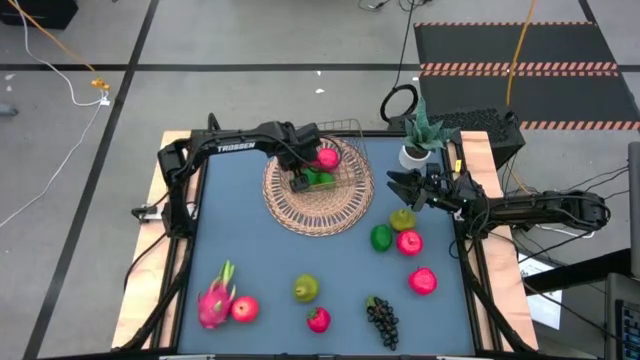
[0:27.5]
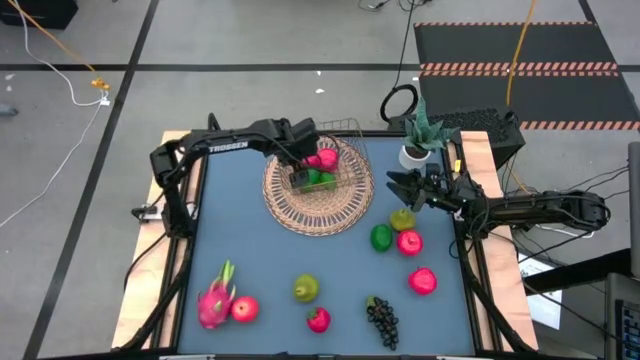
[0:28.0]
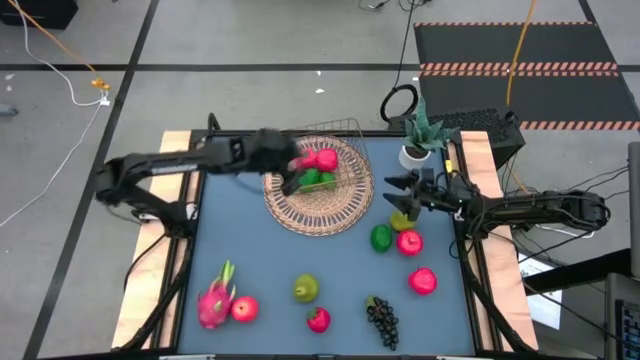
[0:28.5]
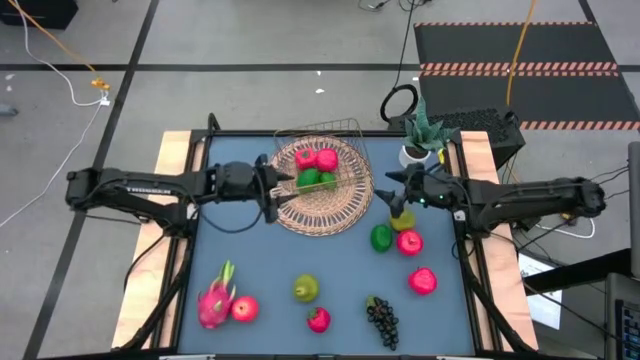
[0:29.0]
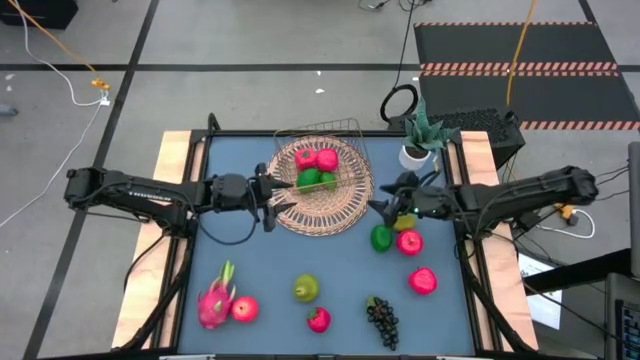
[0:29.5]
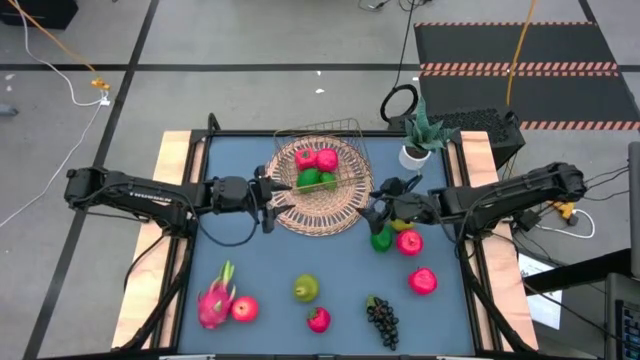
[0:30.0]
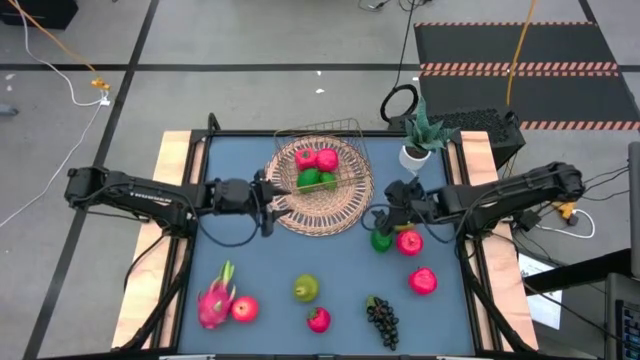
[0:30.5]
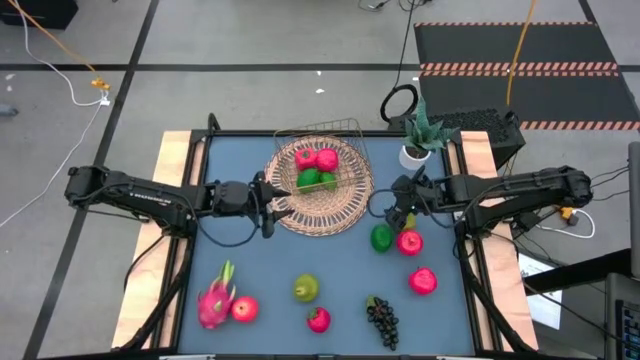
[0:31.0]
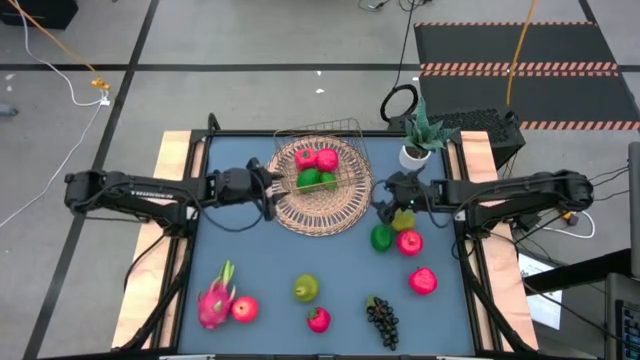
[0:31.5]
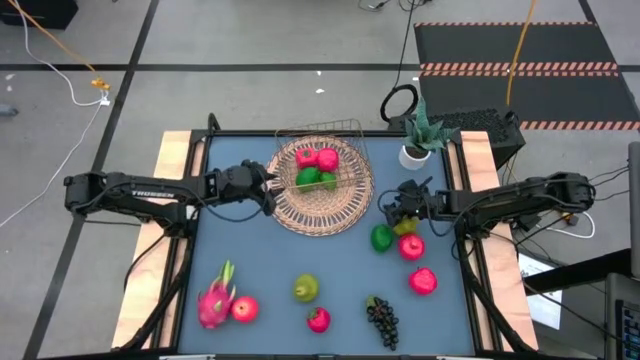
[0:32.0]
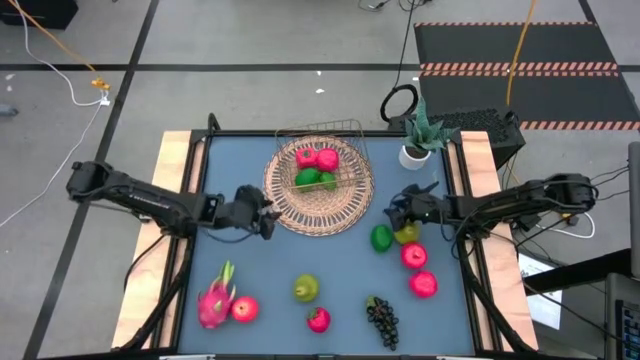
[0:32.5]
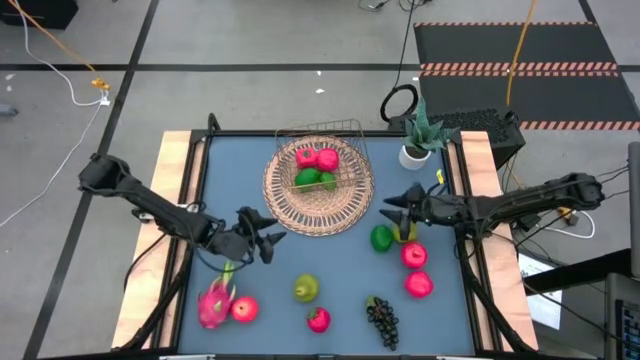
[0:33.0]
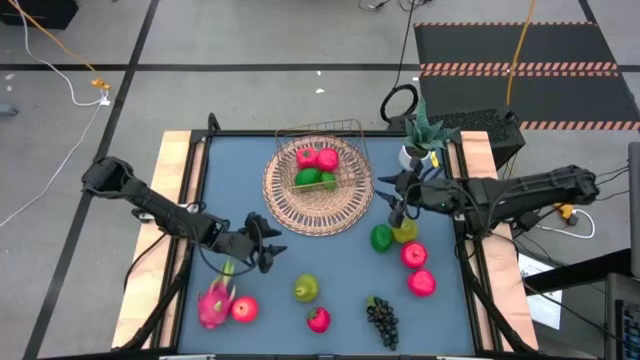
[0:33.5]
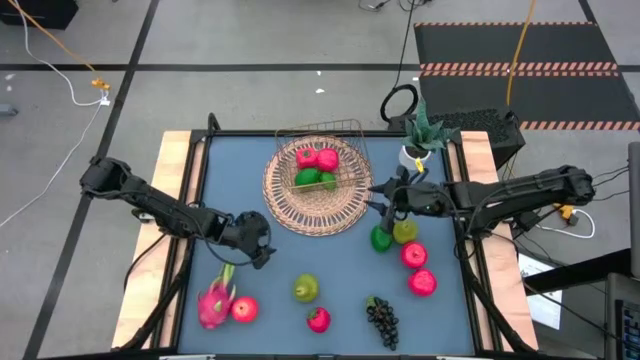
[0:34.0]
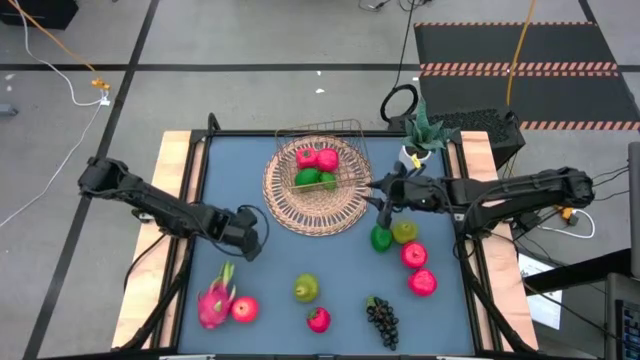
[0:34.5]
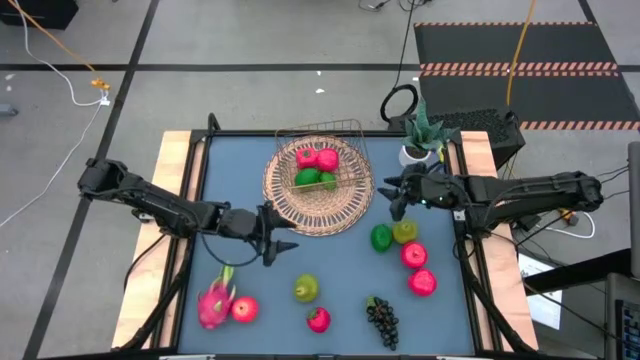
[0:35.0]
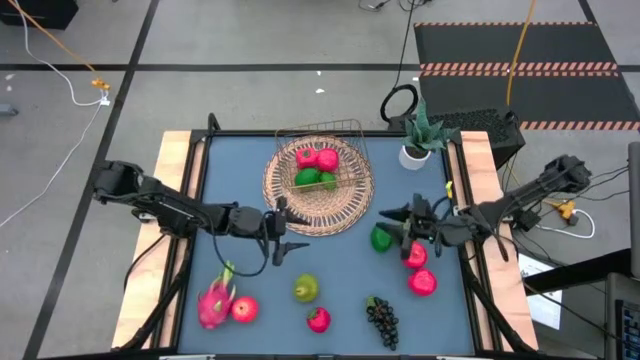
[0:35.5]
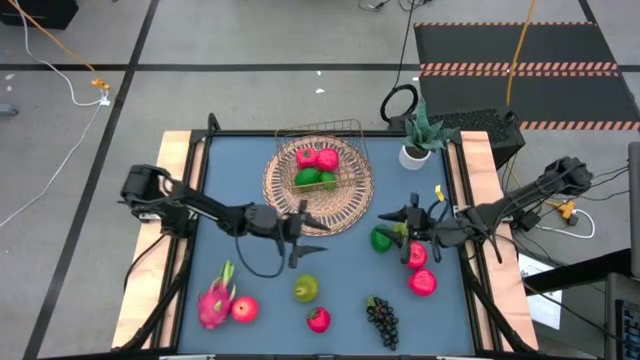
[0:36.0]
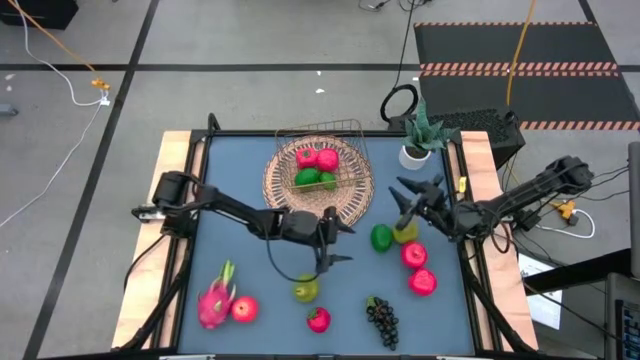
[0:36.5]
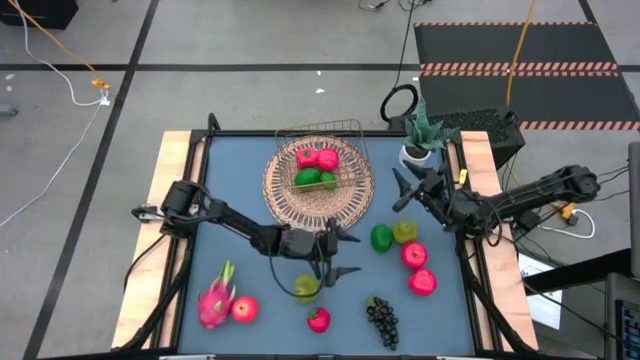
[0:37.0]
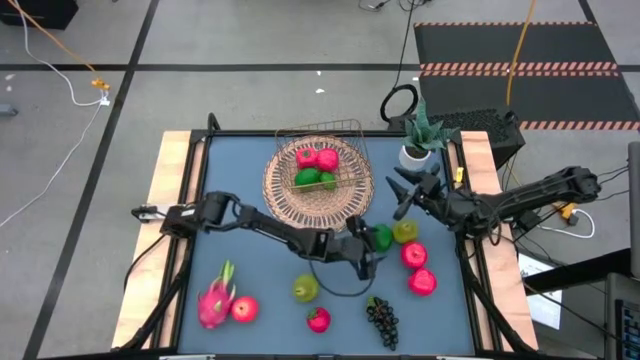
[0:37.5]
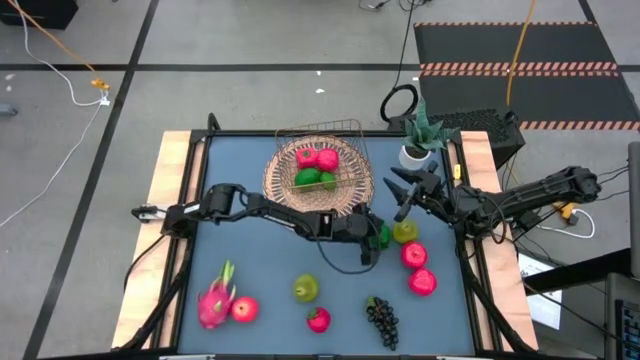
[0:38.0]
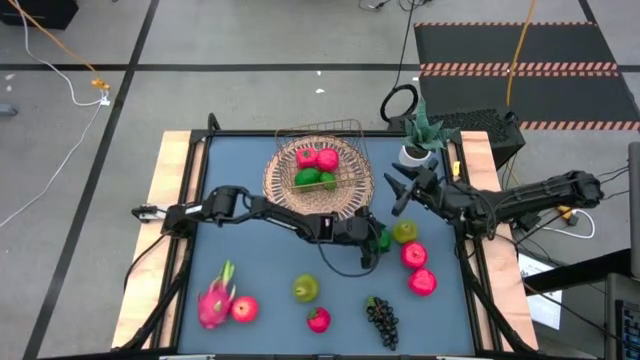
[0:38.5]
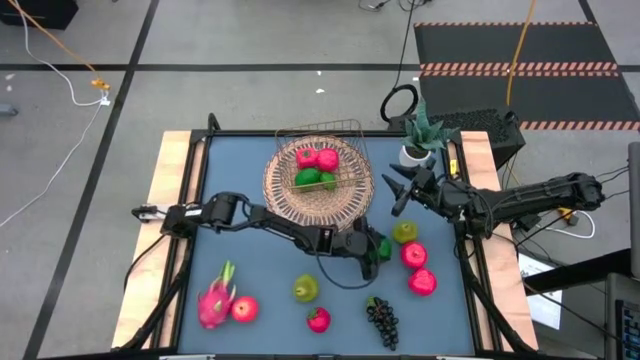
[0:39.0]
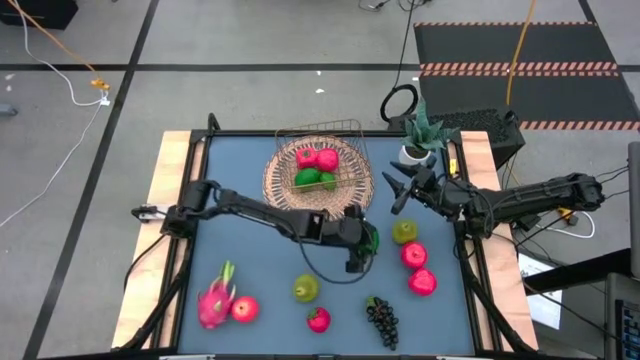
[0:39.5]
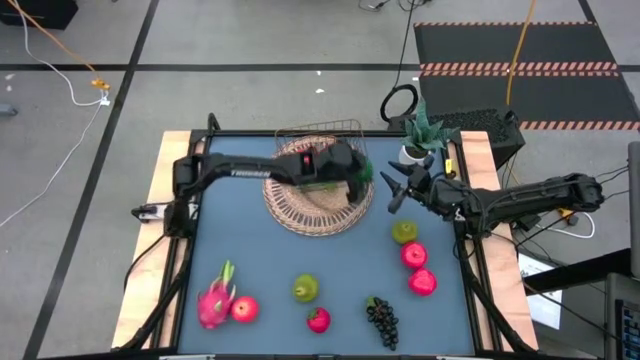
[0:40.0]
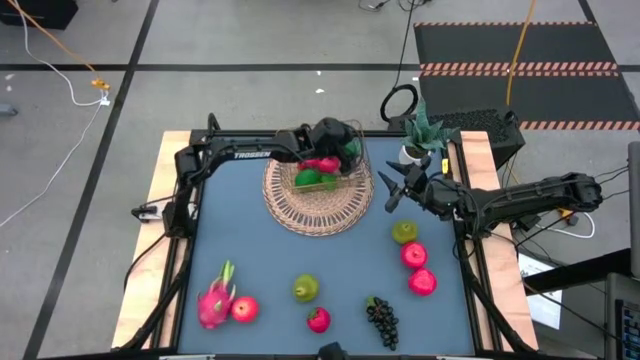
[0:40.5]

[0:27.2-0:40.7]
Task: Build produce basket
Put the green lime into the gold wire basket

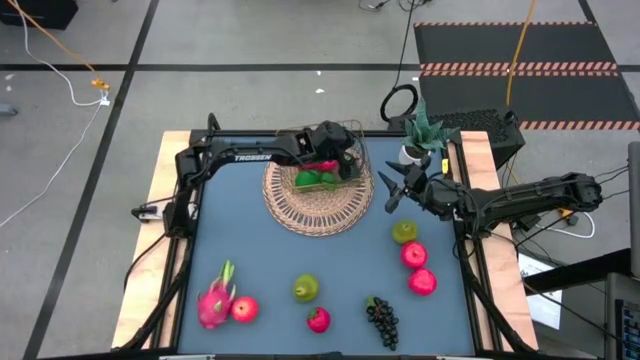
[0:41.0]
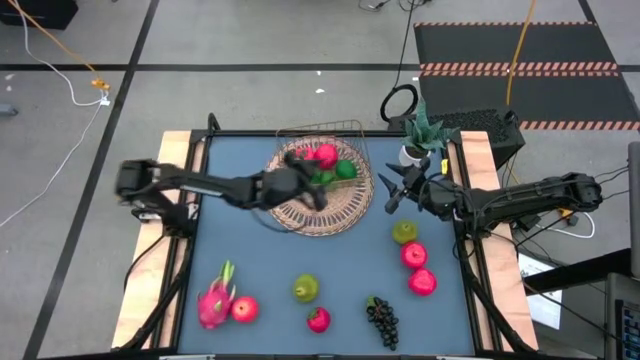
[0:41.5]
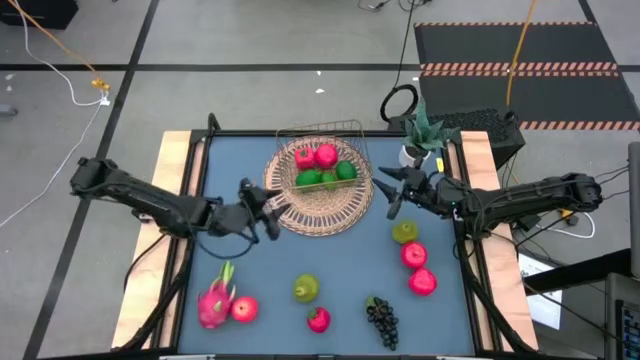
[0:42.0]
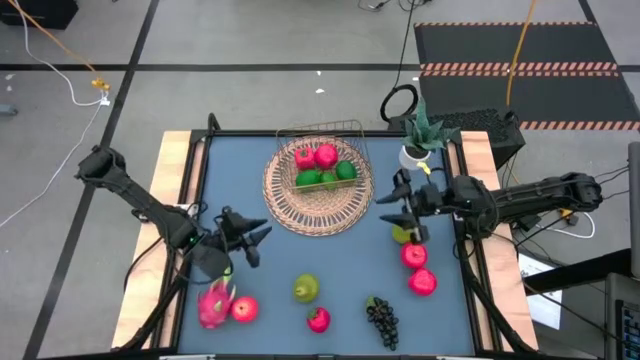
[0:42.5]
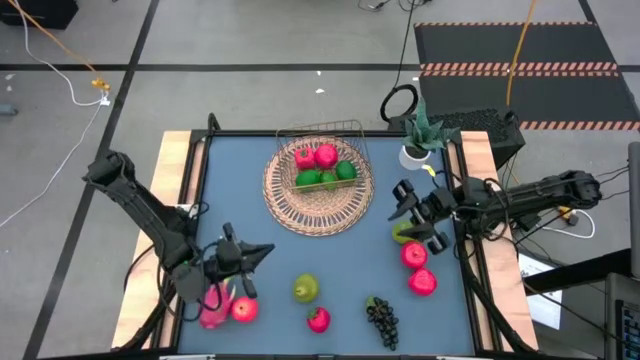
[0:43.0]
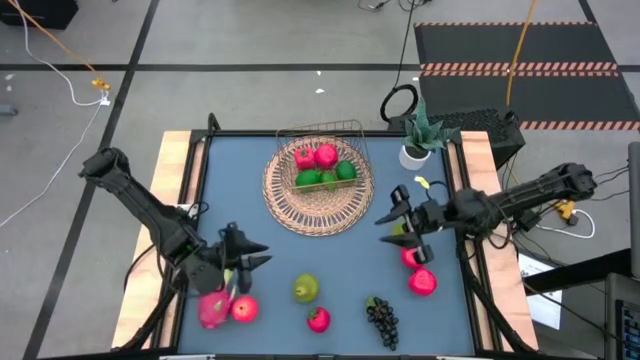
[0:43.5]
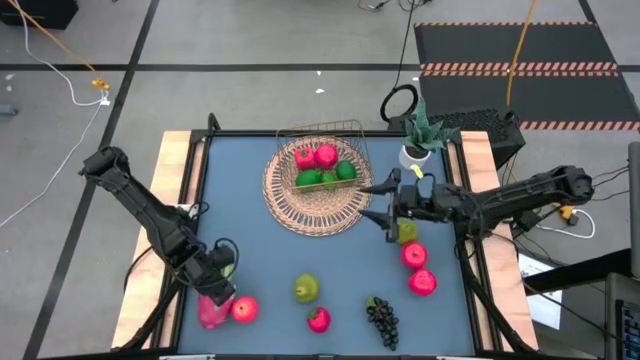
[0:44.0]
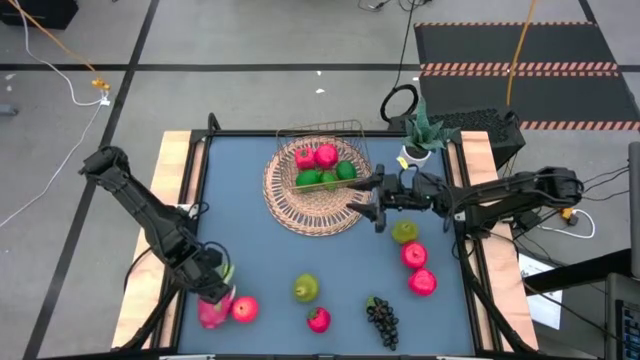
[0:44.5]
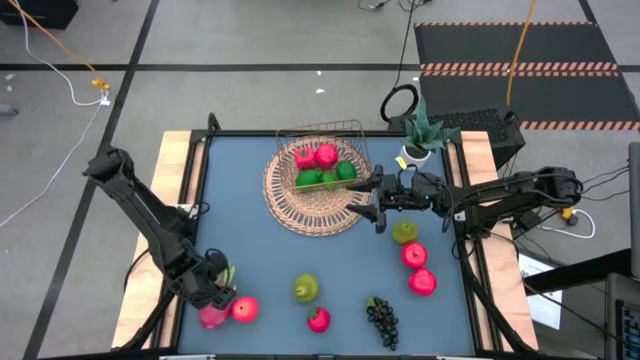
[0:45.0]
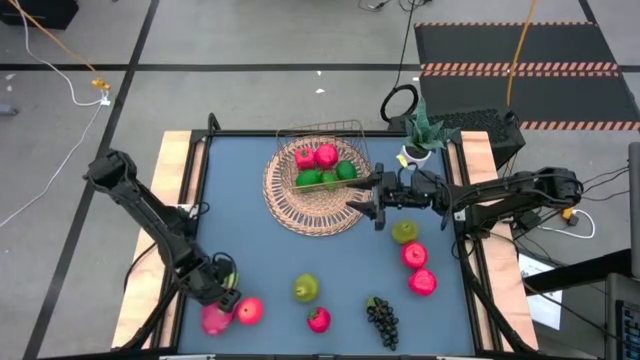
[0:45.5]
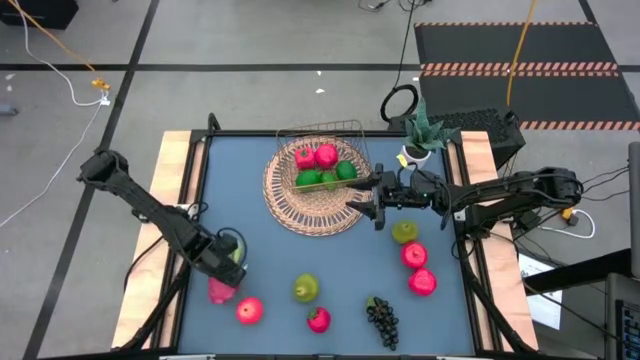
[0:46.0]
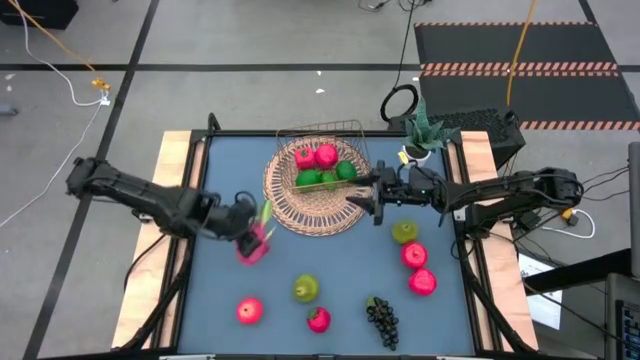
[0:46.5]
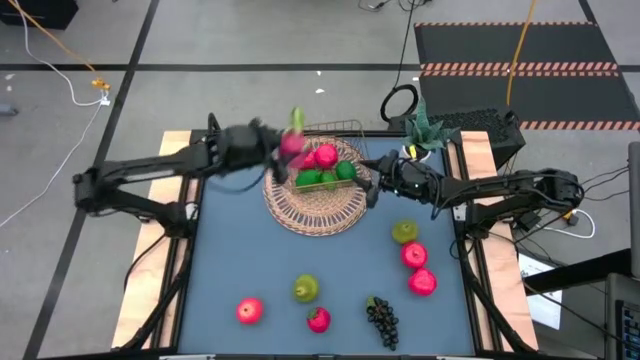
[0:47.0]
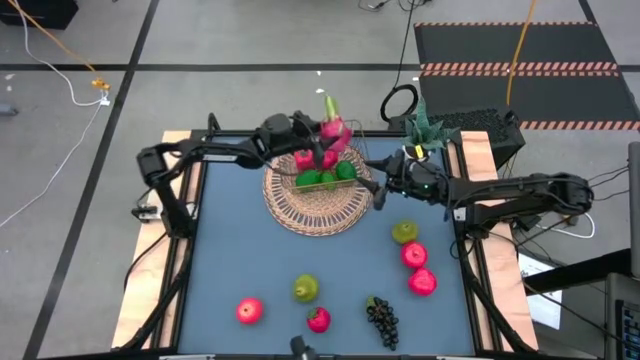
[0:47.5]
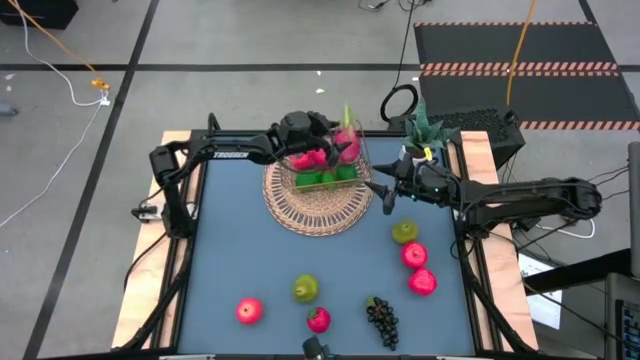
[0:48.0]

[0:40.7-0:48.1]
Put the red dragon fruit into the gold wire basket

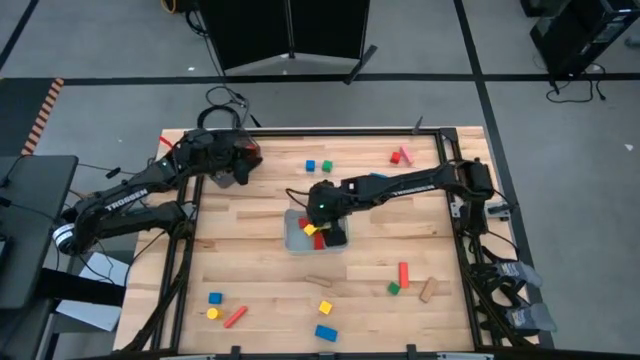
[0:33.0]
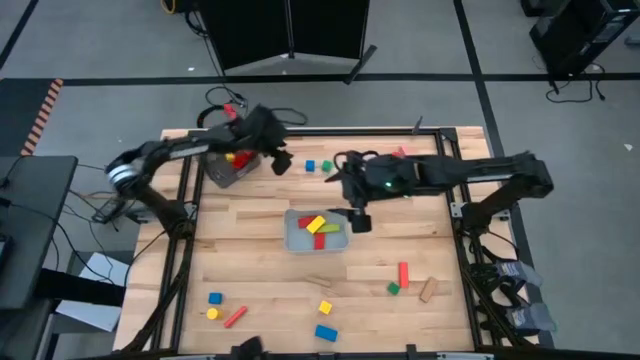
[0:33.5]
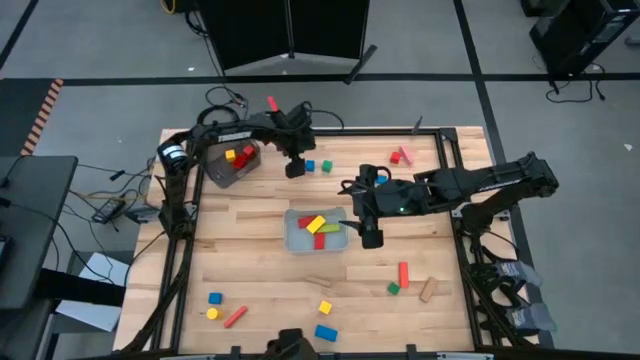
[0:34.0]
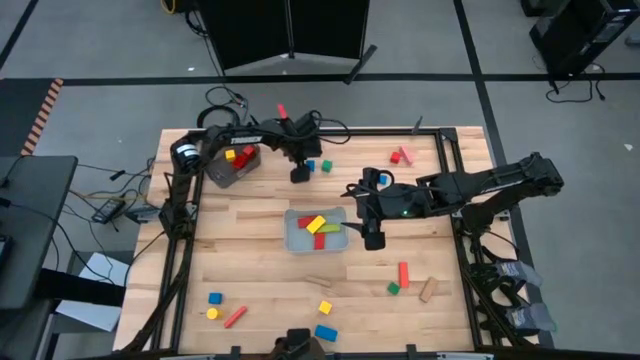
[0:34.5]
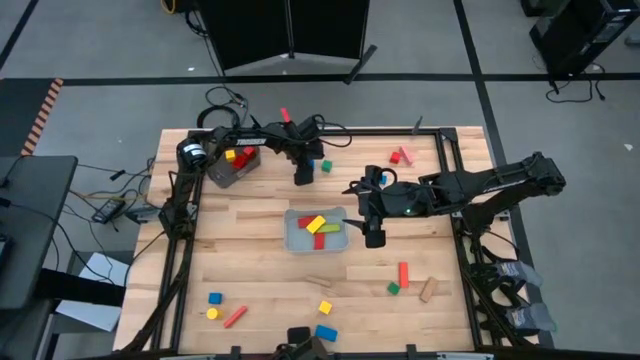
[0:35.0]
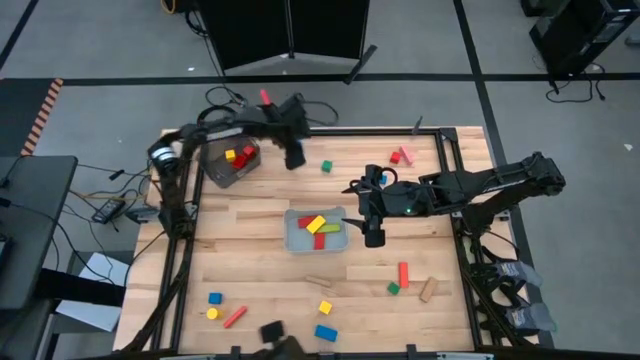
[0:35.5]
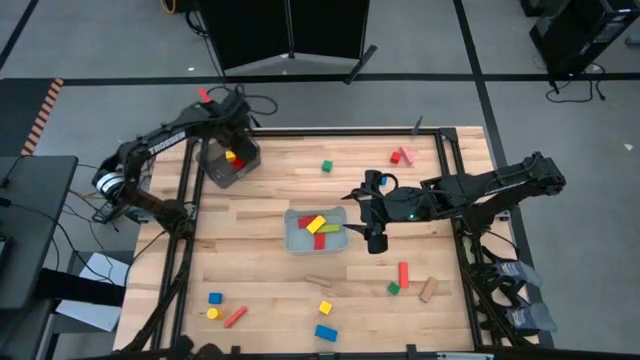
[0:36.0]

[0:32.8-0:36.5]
Task: Sort blocks by size
Put the top blue cube block into the black bin
